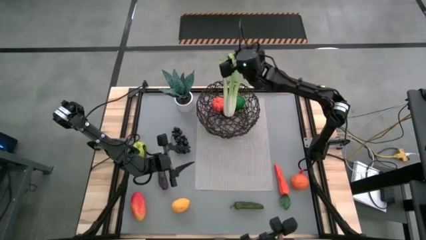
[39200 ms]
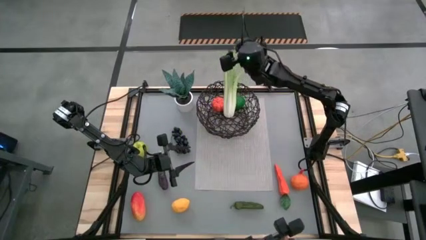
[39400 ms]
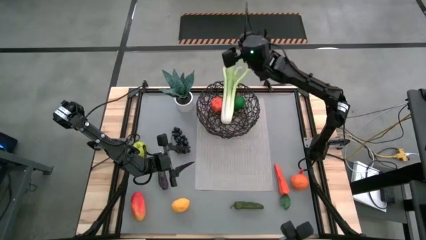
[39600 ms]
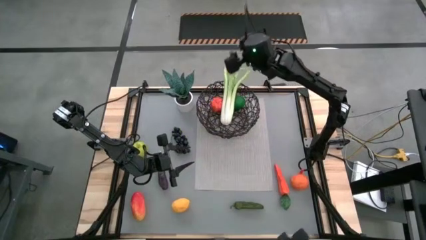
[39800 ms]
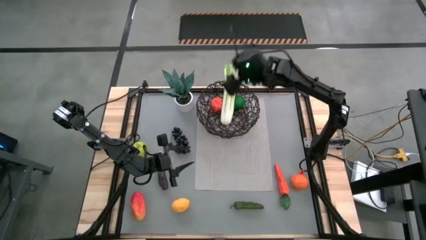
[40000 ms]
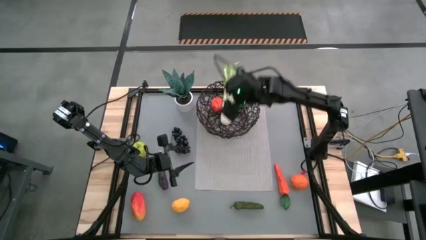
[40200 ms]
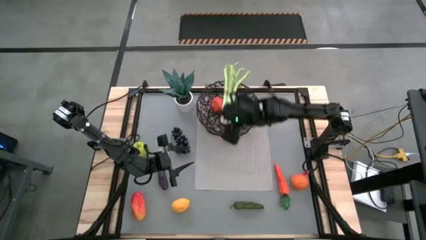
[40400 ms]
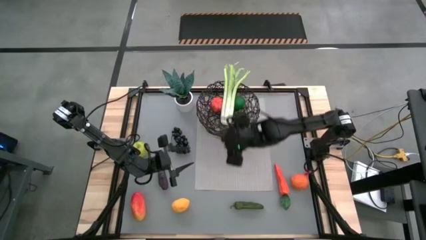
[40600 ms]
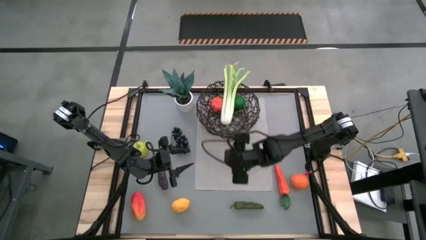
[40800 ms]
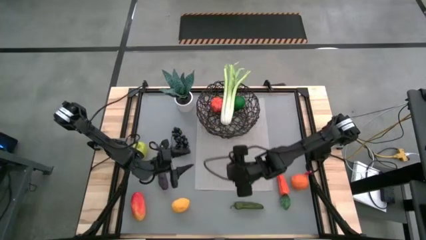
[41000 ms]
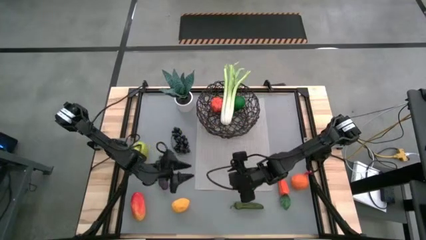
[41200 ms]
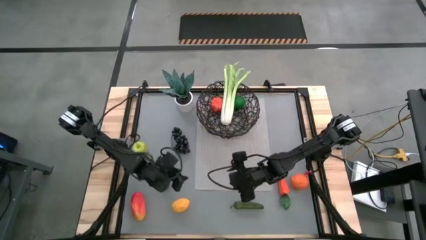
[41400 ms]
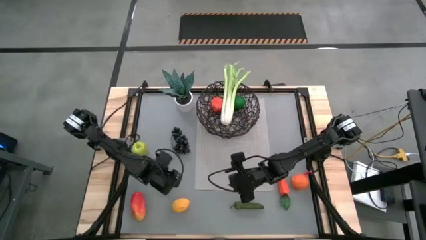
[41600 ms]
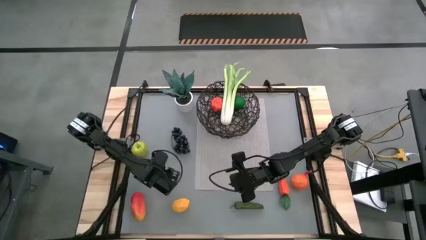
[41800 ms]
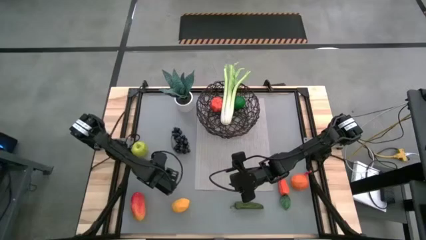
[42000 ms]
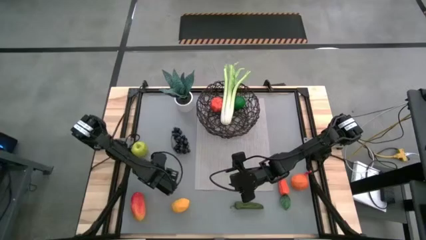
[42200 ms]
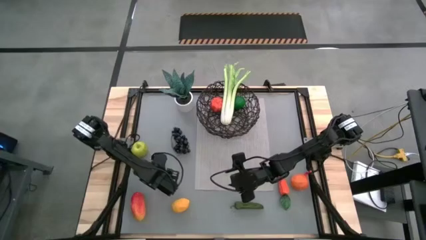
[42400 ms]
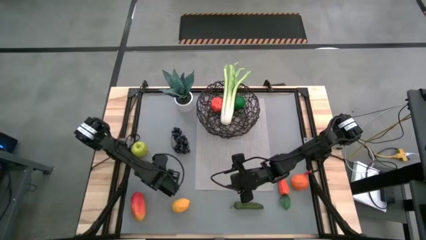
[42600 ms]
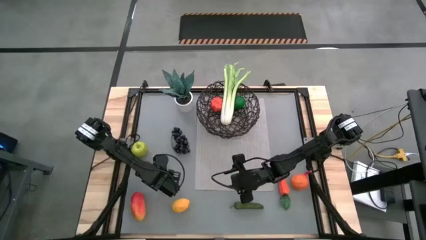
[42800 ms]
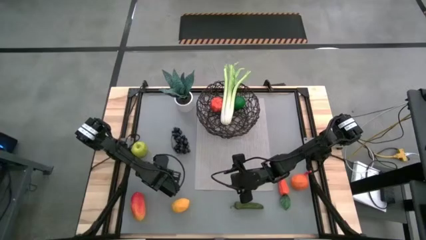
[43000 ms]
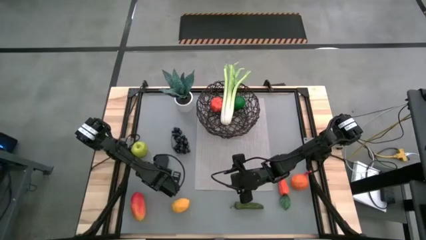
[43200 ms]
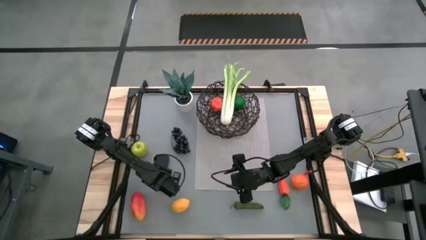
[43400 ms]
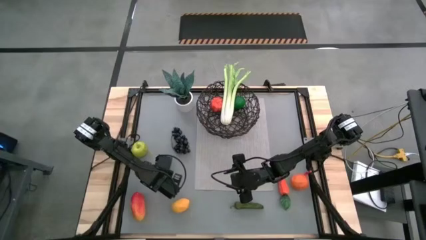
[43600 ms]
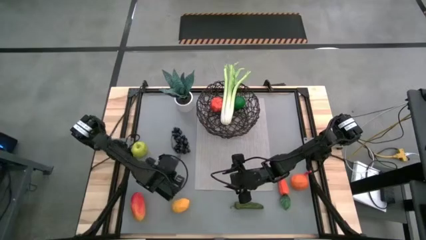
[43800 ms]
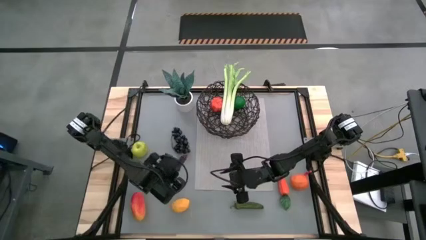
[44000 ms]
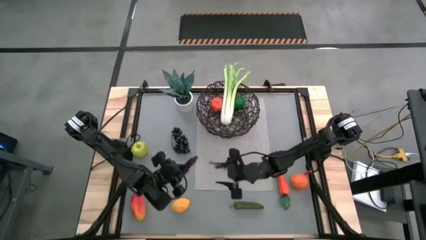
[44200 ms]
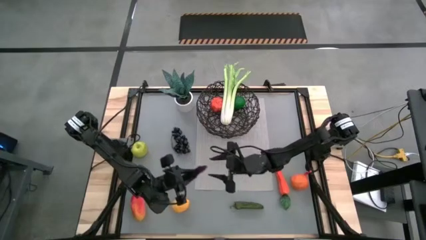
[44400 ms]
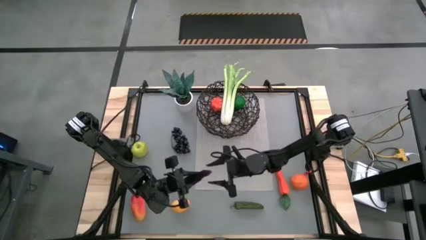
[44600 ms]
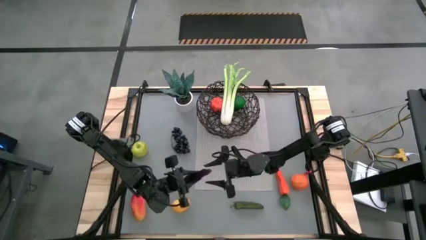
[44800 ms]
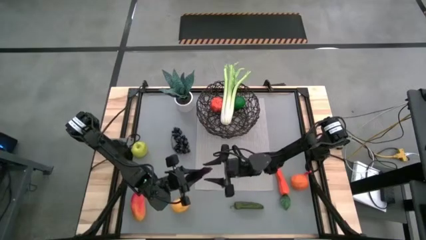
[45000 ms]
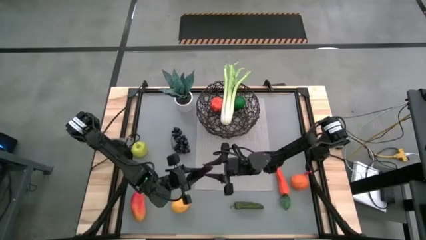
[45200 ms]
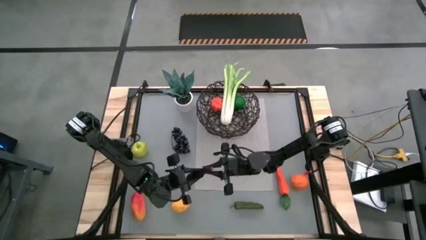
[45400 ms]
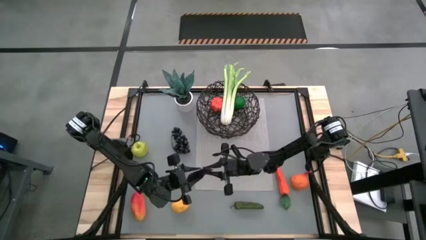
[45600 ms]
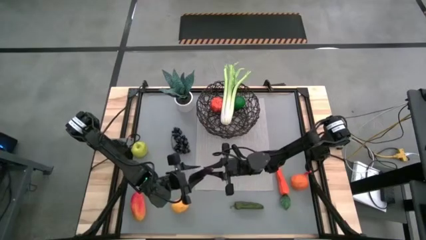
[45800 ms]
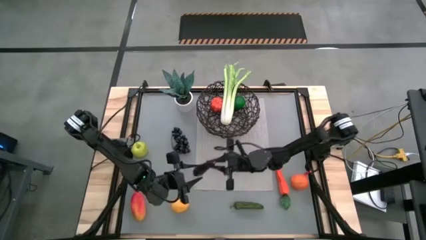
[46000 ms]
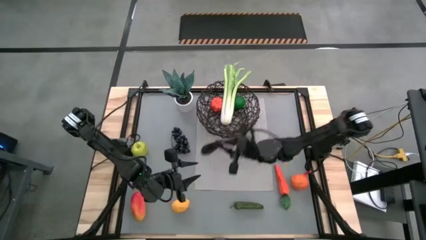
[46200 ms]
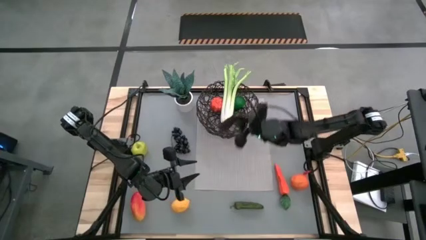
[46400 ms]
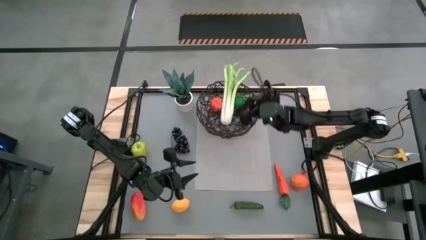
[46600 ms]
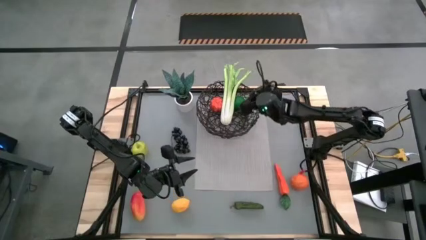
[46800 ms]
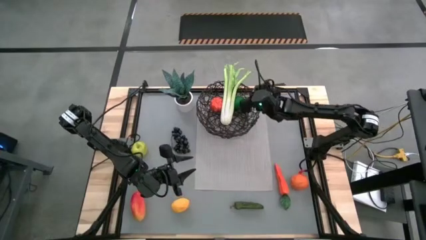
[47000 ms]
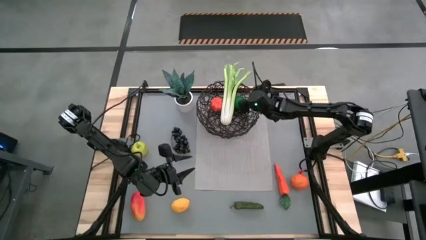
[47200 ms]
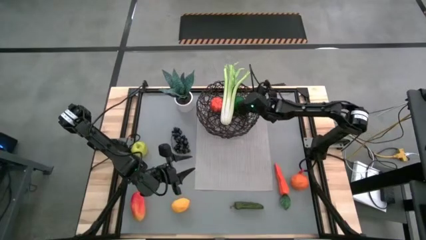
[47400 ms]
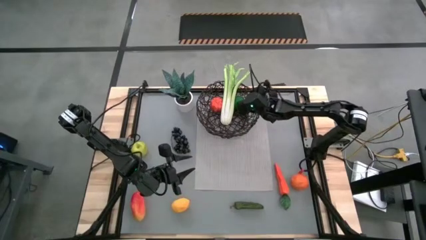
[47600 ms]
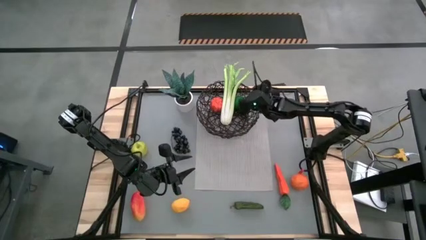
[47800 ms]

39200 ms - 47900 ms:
Task: Build produce basket
Put the purple eggplant into the black wire basket

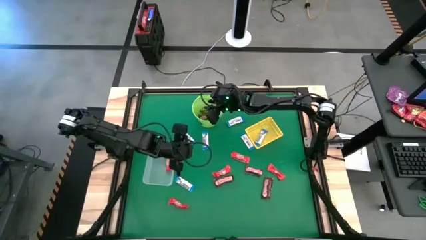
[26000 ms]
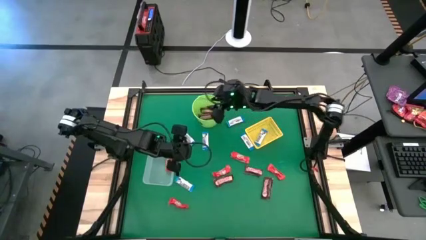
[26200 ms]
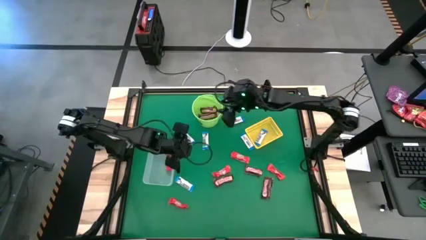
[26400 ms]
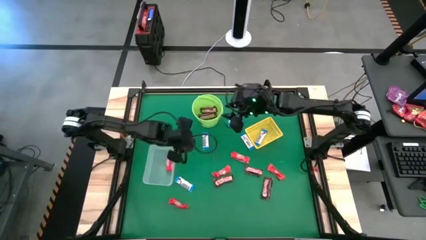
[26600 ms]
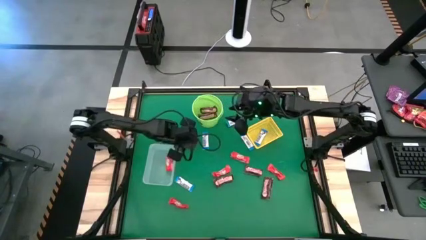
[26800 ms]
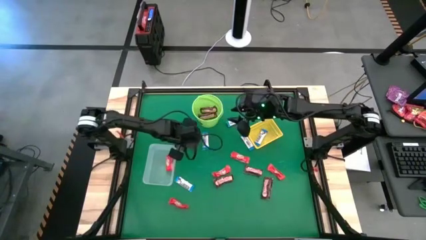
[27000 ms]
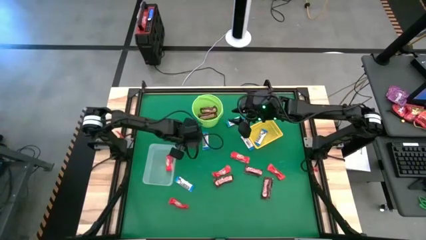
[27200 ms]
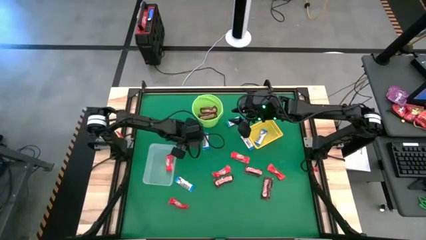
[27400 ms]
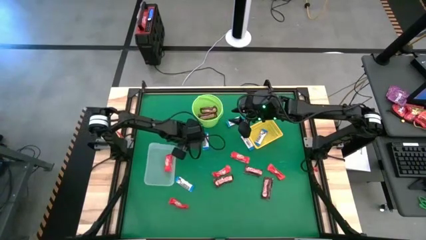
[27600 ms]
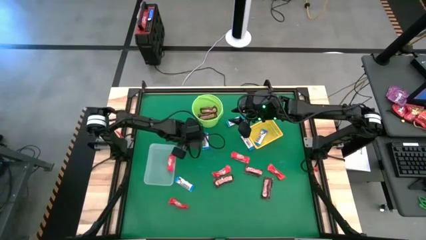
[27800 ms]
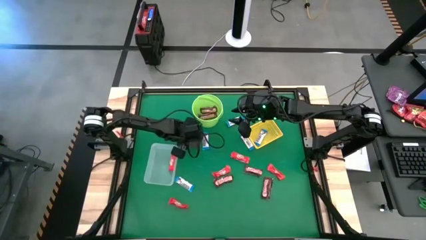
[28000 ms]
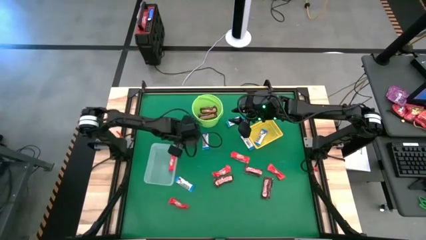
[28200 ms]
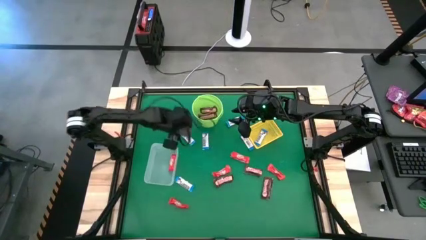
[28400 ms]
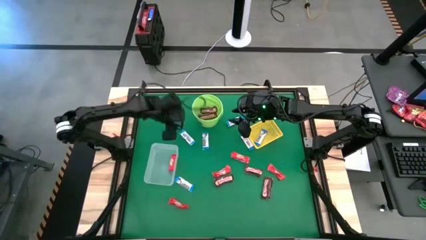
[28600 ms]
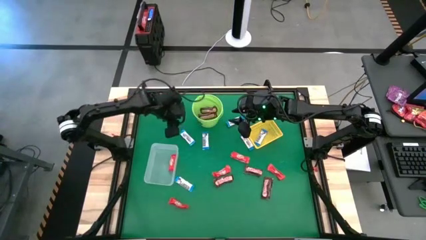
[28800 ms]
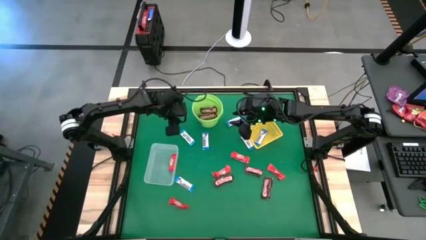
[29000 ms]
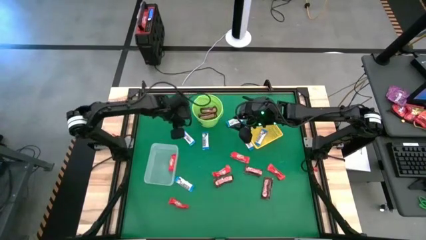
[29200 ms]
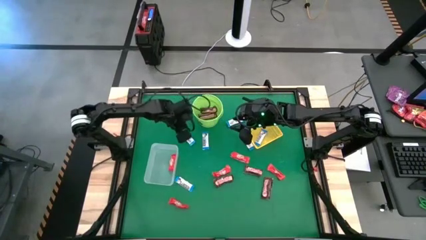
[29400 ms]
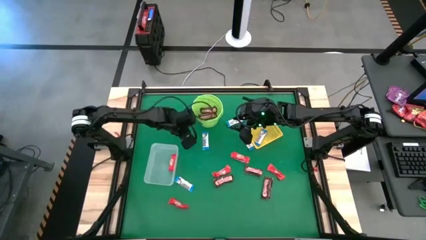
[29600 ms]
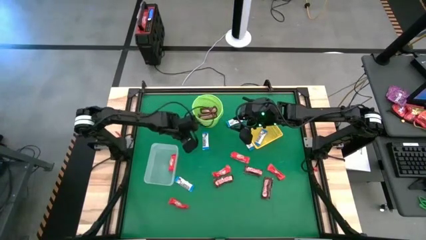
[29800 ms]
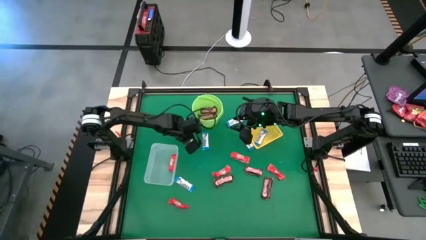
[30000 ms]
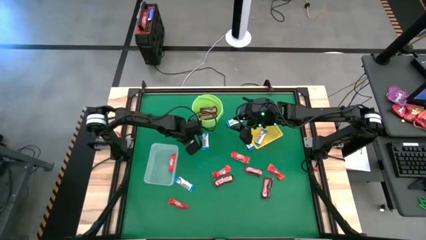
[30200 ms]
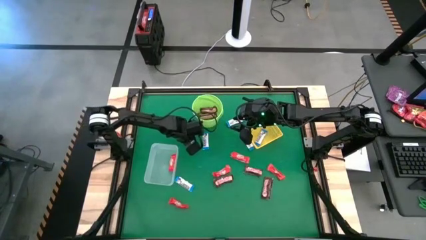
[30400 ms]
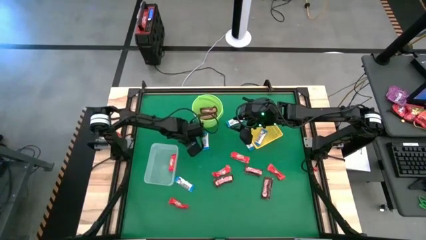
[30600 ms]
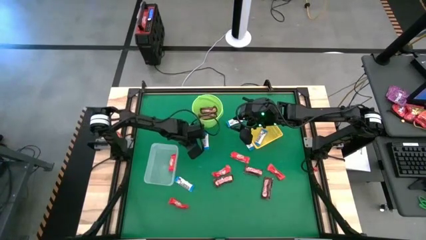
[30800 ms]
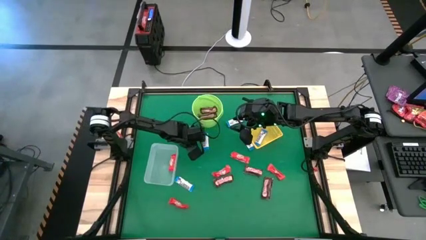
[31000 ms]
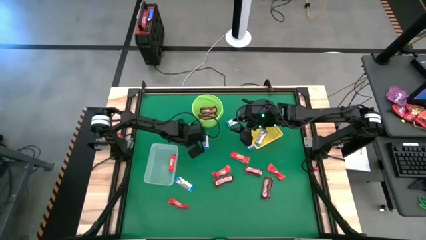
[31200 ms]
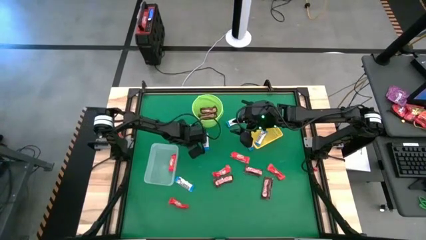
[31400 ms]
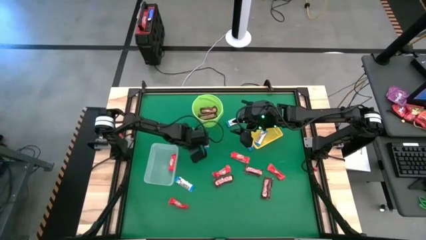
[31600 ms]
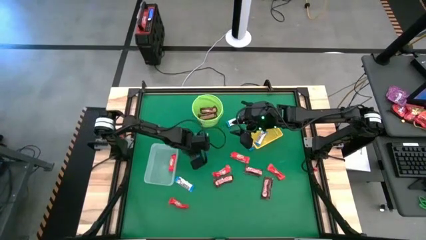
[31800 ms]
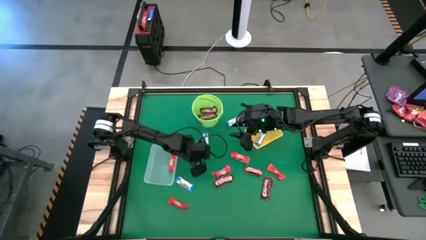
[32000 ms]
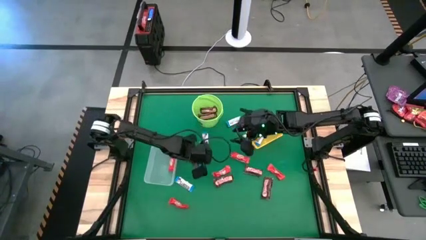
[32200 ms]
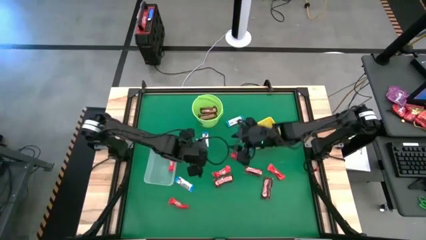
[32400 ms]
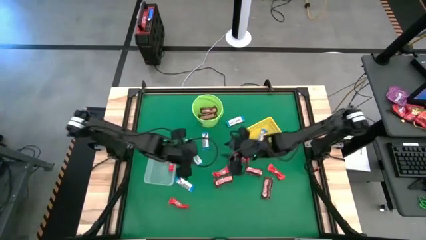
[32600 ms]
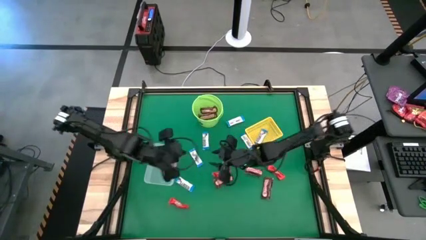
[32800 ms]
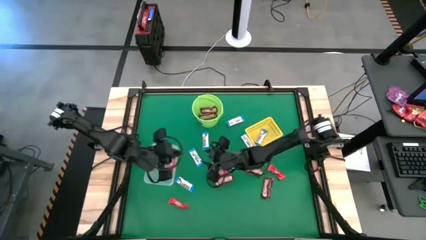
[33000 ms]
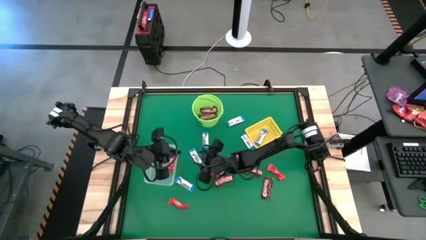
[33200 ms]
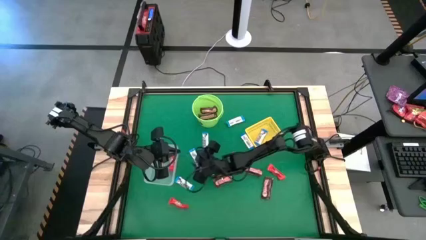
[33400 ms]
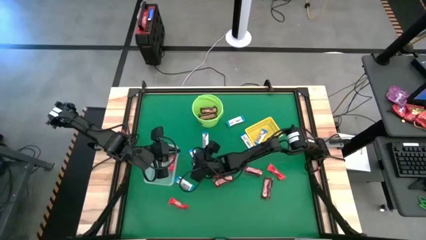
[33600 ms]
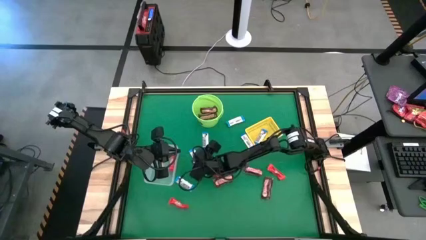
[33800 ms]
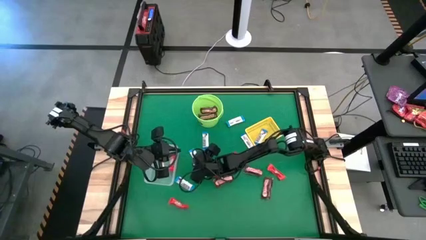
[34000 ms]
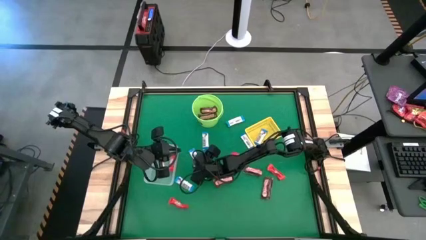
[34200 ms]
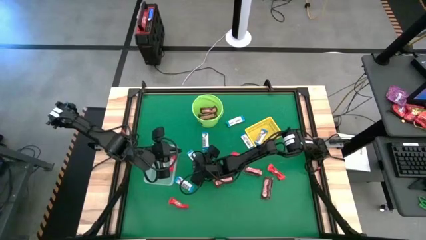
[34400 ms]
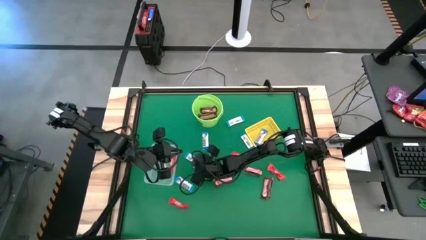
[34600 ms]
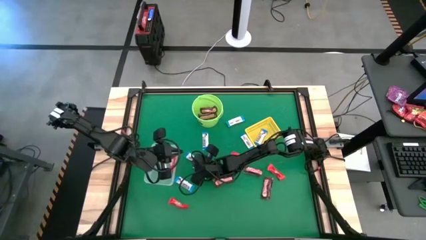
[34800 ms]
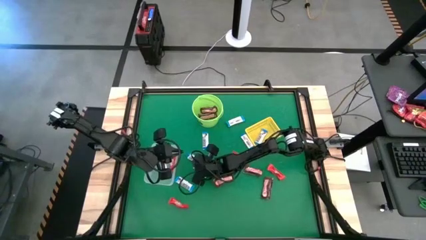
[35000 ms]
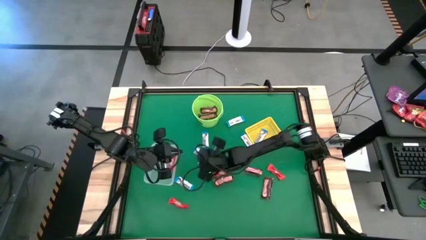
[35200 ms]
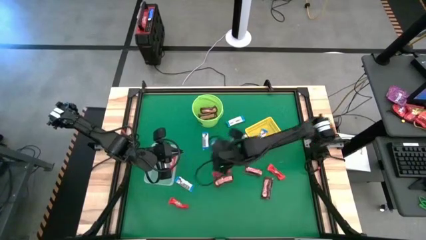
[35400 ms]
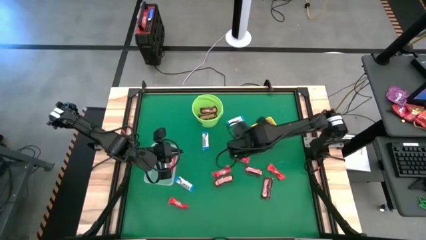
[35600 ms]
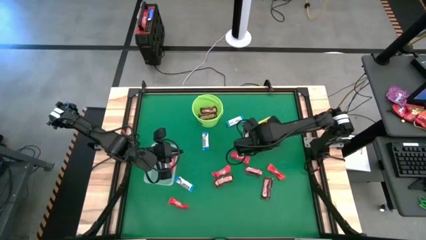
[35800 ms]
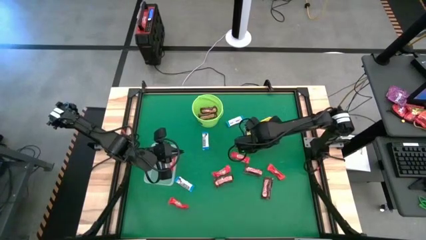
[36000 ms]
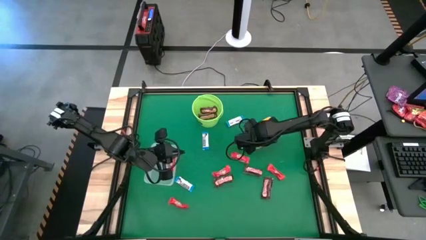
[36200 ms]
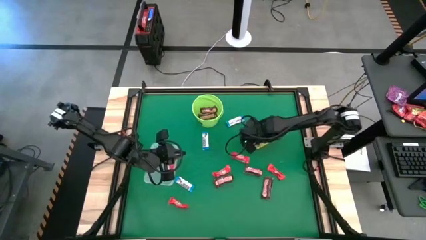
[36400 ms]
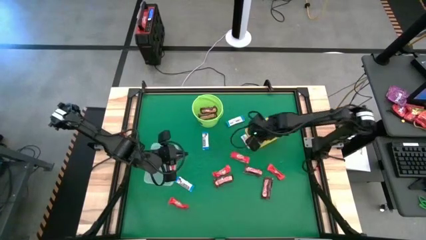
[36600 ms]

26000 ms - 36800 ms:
Task: Sort candy by brand, put in halloween buckets
Put the white chocolate bar into the yellow bin
